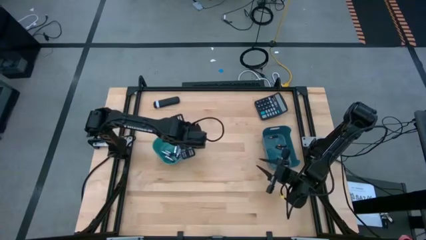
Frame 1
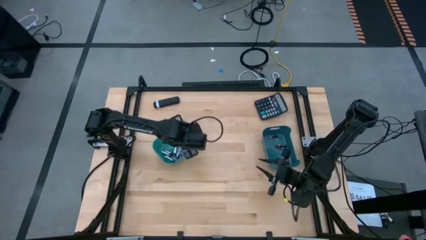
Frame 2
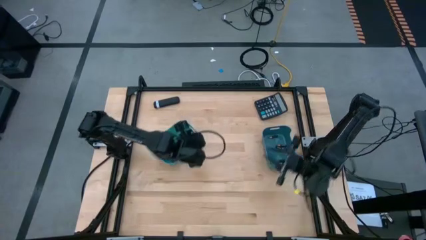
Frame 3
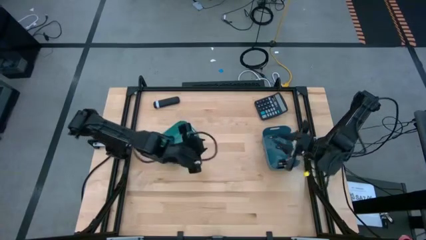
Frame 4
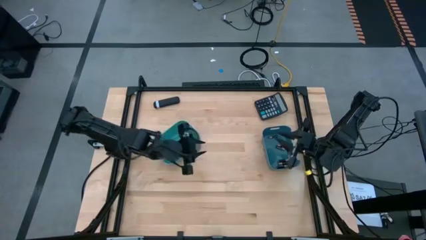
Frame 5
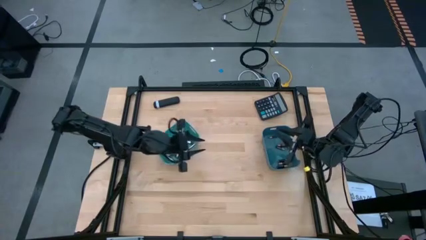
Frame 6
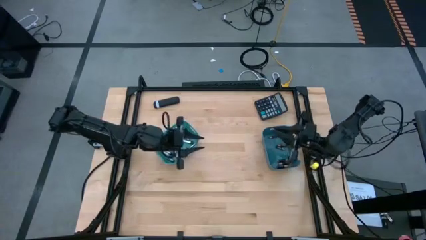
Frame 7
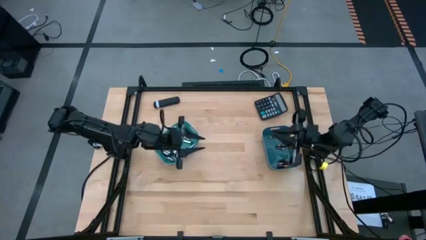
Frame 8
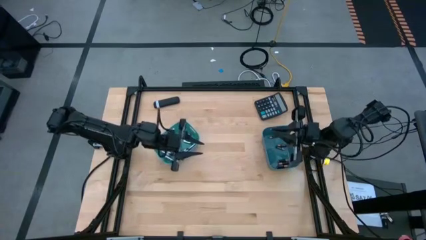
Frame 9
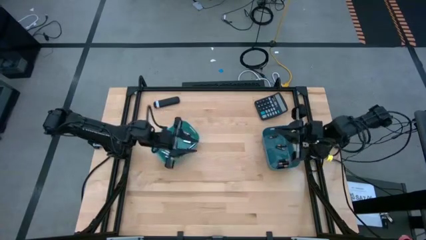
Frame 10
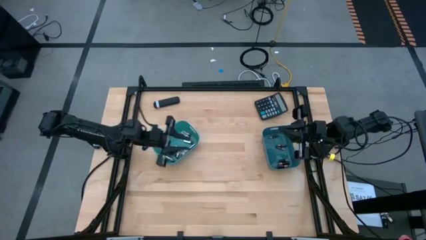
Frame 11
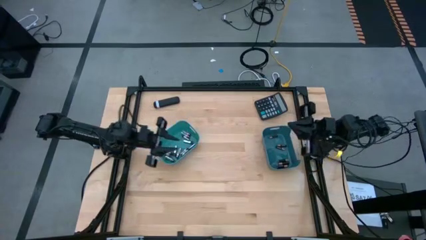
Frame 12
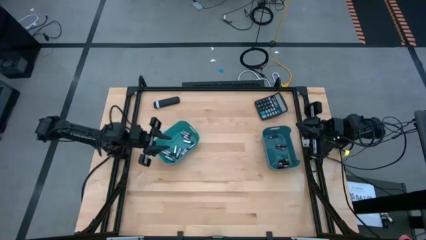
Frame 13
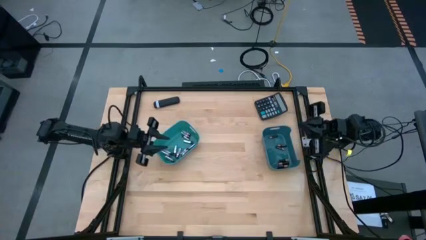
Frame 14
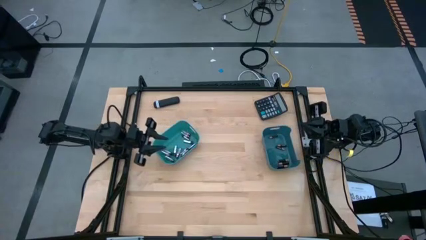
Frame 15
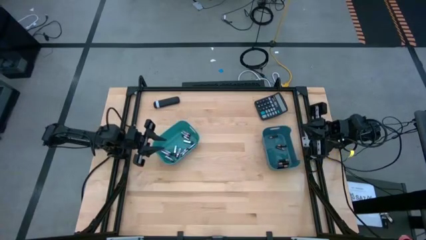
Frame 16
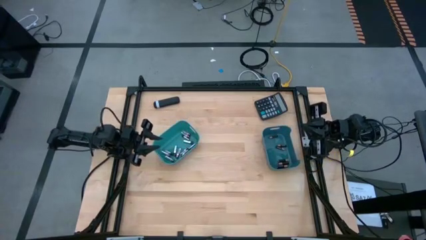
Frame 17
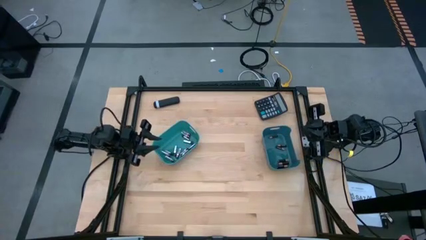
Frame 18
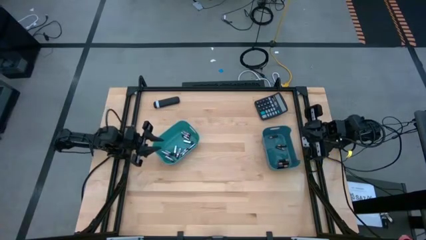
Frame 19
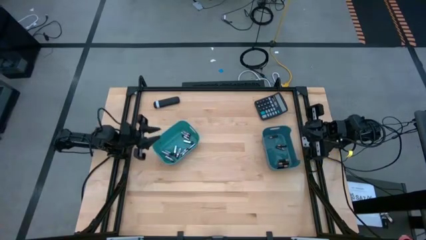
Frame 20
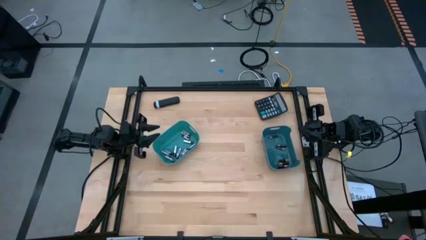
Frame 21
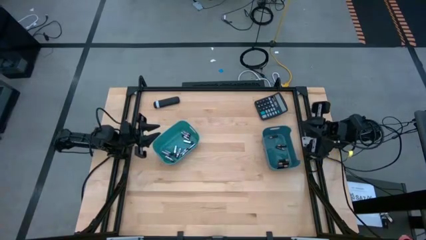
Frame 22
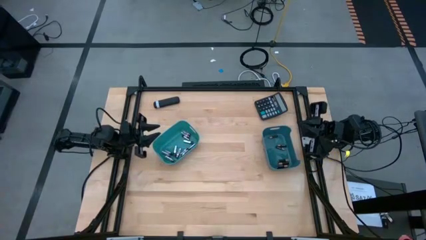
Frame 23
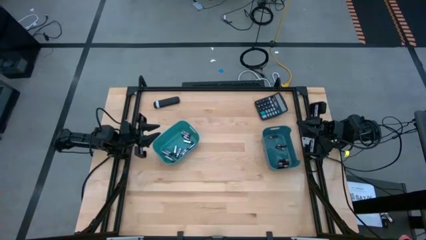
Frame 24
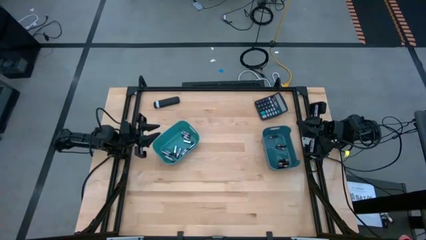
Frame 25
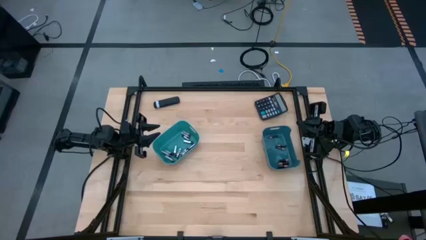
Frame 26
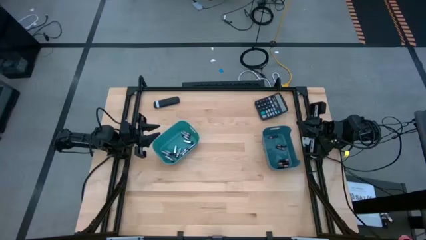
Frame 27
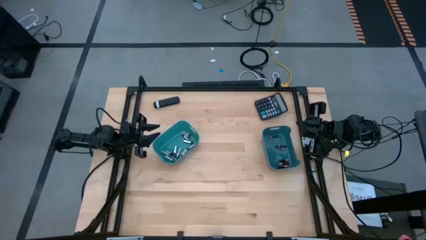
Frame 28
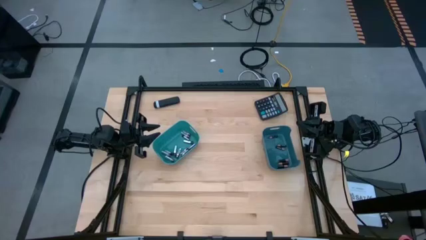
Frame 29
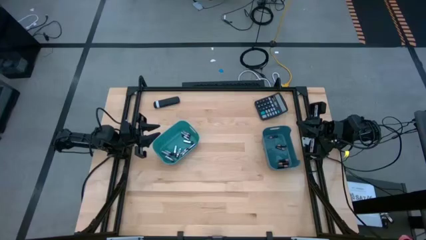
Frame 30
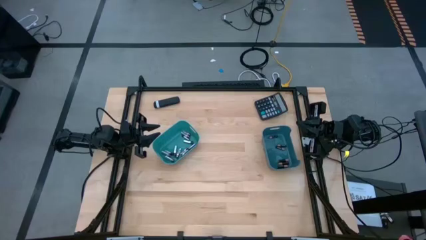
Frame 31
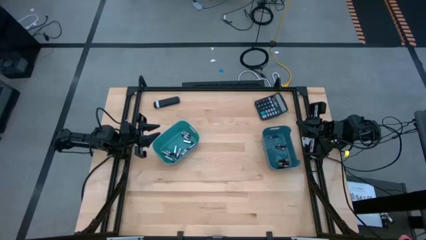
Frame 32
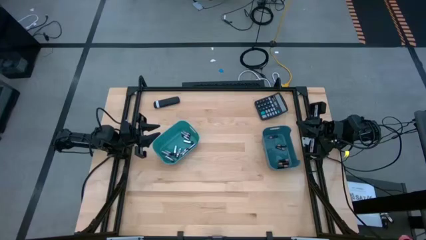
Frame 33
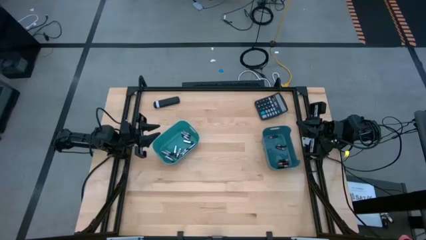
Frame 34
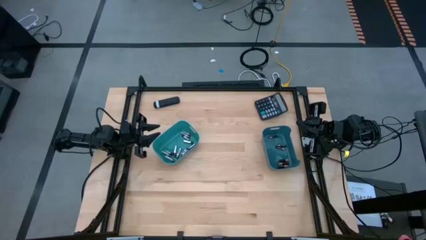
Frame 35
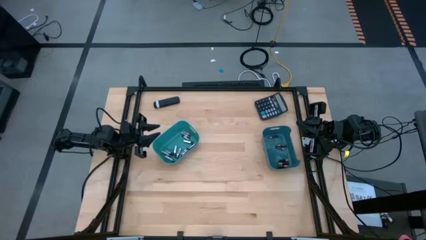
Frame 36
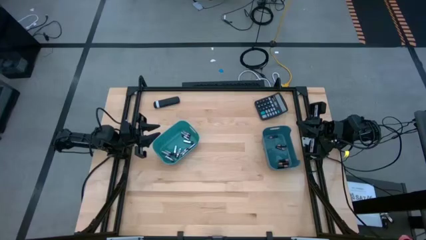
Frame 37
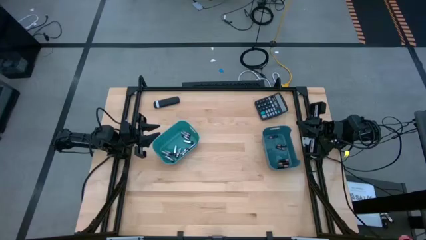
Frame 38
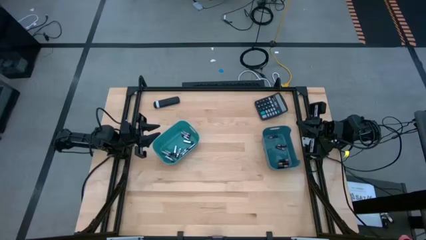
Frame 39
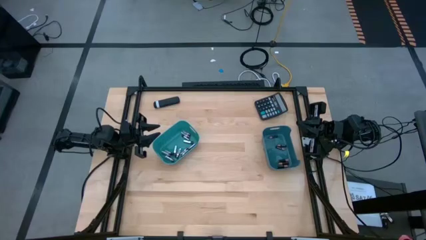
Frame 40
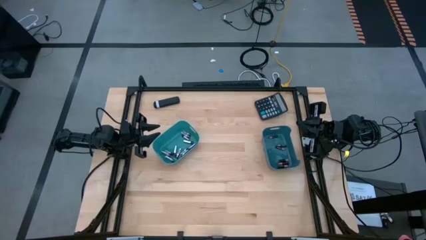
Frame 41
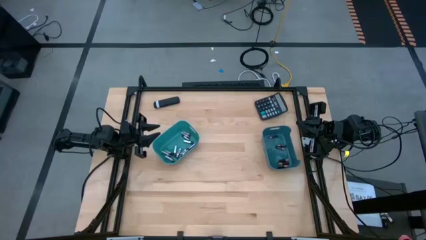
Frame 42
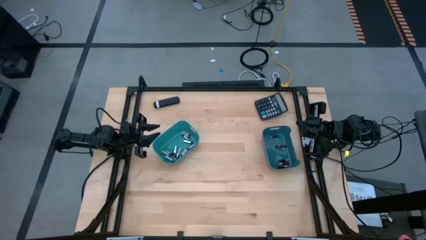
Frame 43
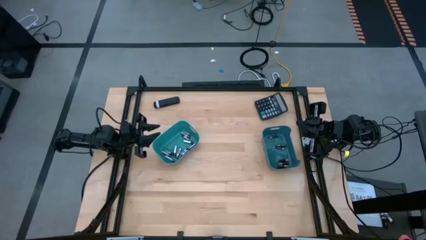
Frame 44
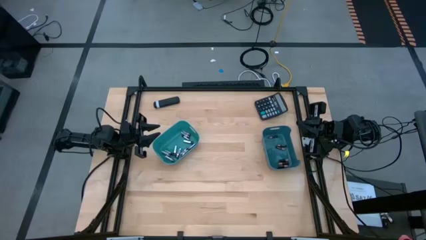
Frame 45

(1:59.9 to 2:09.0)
Task: Sort batteries
Return to Home Position

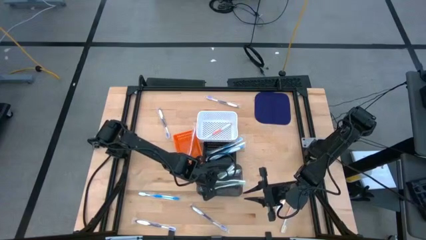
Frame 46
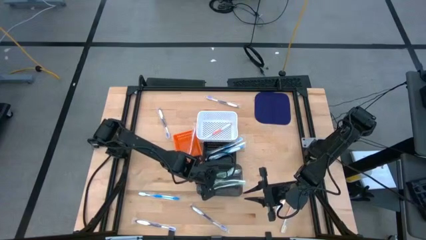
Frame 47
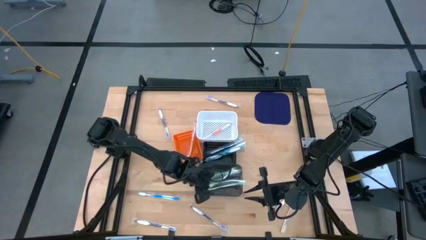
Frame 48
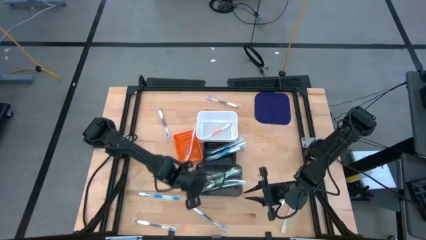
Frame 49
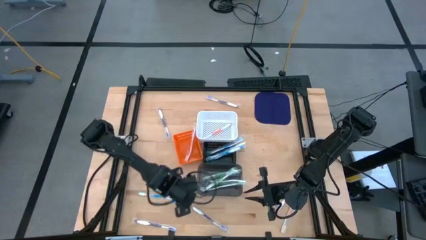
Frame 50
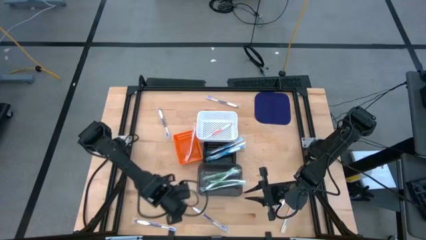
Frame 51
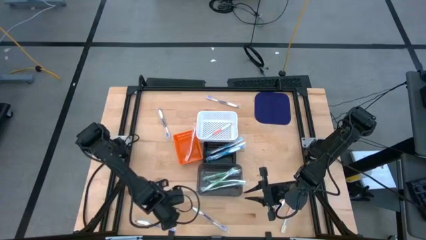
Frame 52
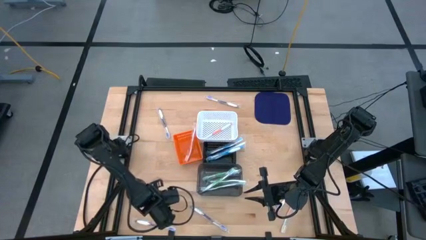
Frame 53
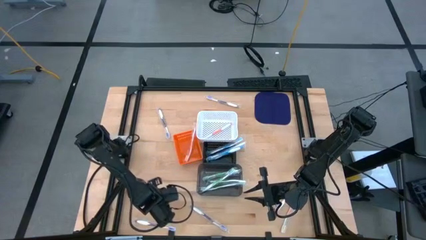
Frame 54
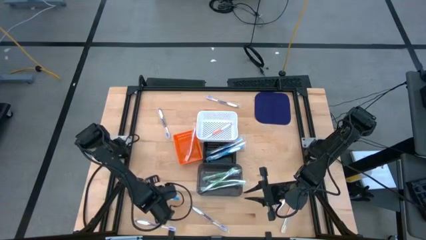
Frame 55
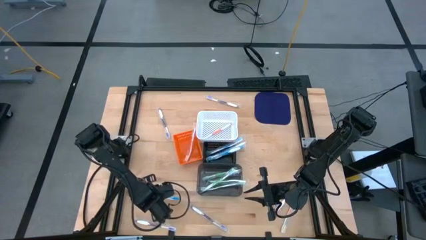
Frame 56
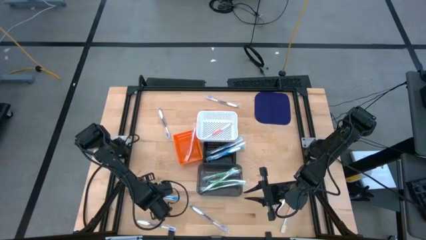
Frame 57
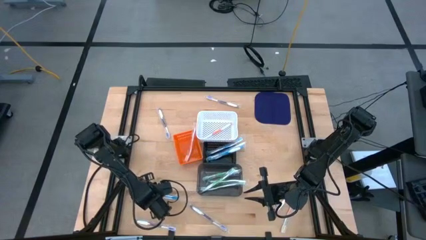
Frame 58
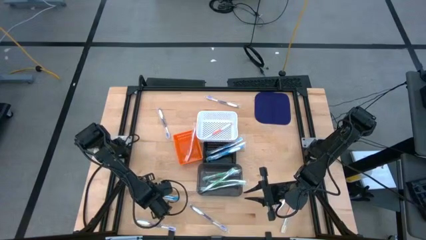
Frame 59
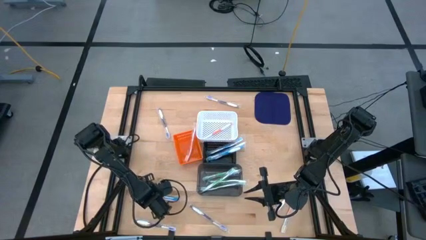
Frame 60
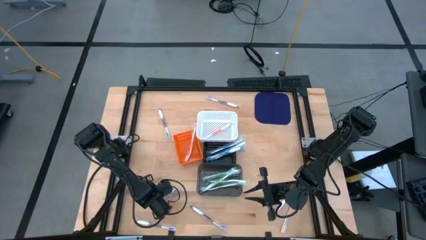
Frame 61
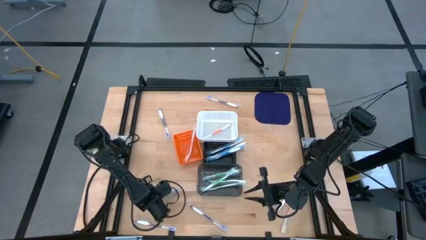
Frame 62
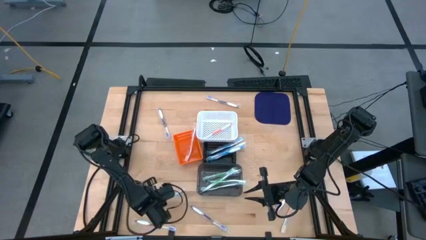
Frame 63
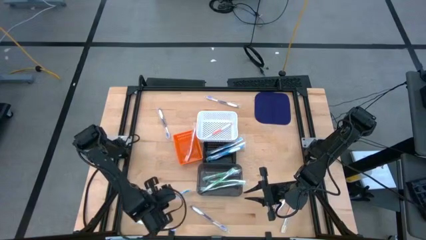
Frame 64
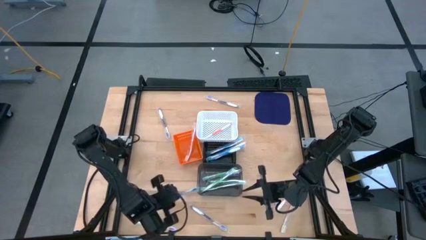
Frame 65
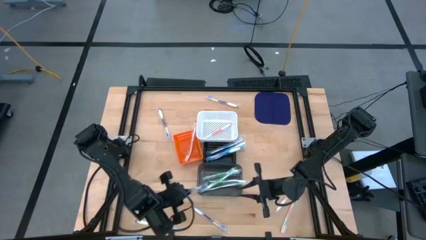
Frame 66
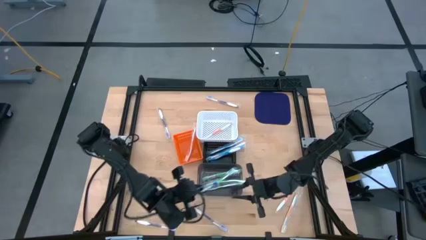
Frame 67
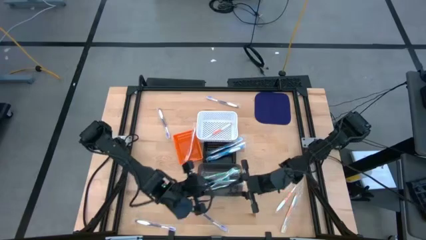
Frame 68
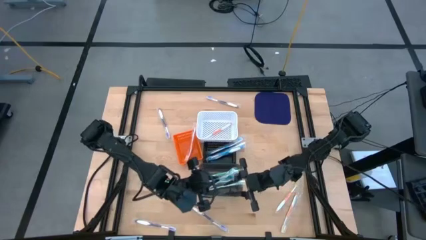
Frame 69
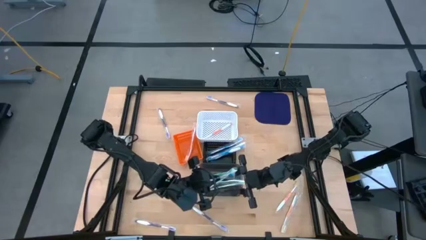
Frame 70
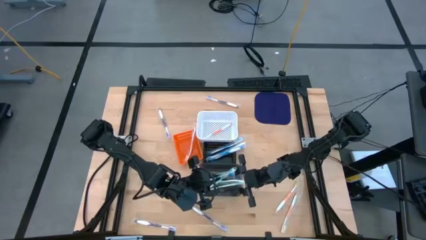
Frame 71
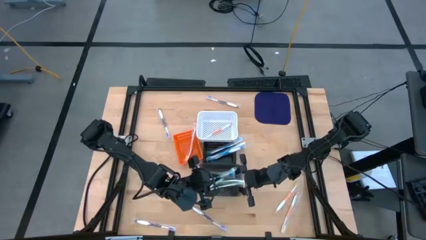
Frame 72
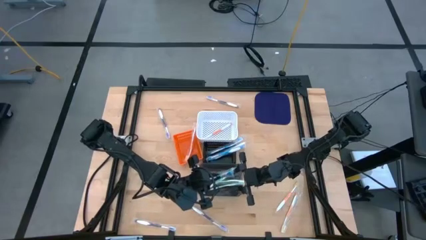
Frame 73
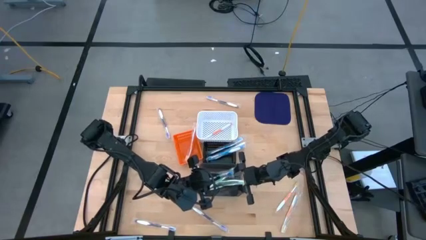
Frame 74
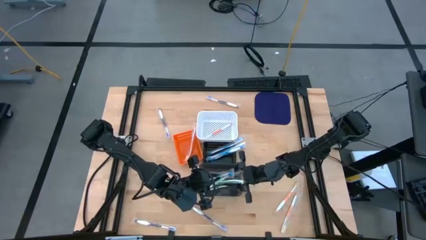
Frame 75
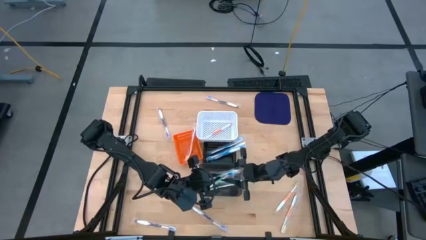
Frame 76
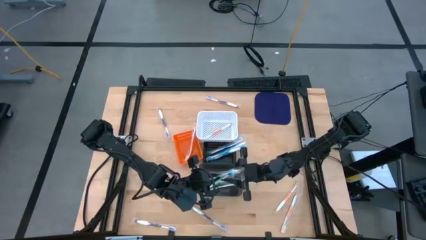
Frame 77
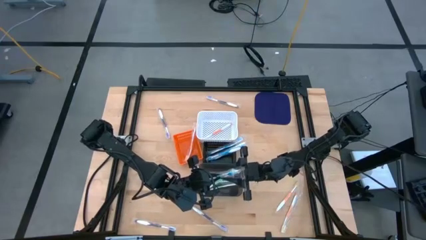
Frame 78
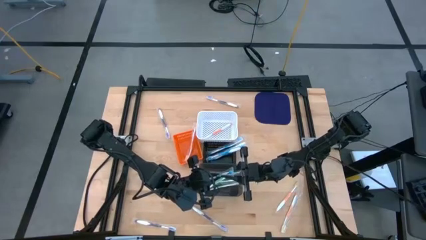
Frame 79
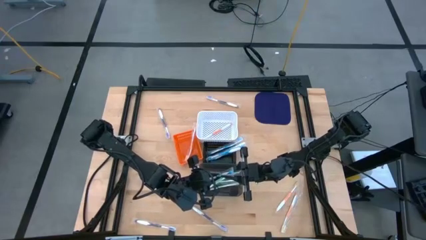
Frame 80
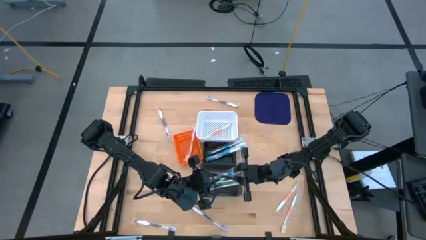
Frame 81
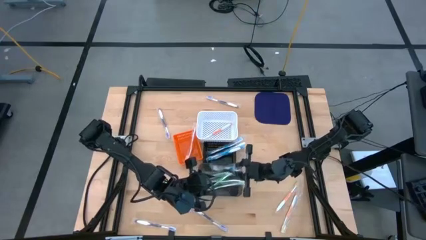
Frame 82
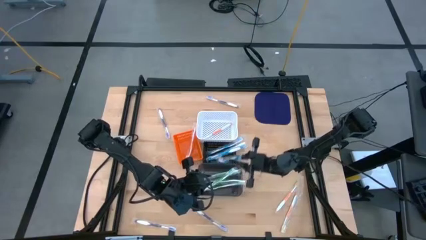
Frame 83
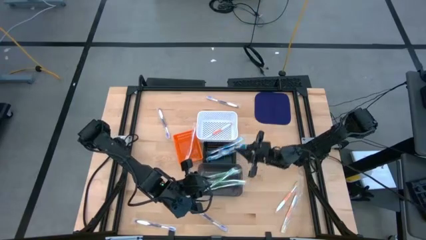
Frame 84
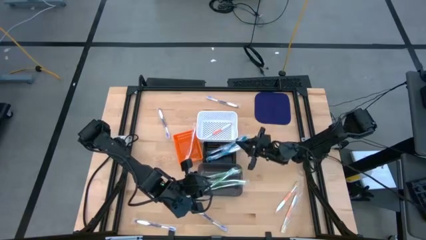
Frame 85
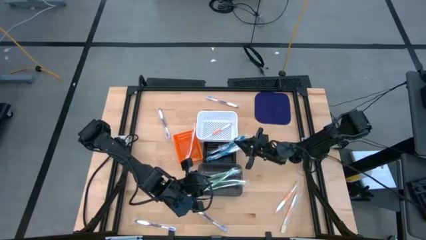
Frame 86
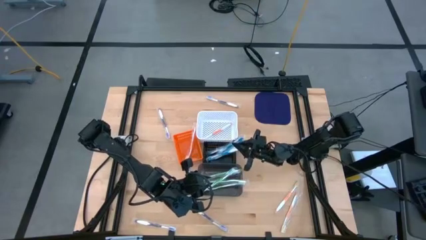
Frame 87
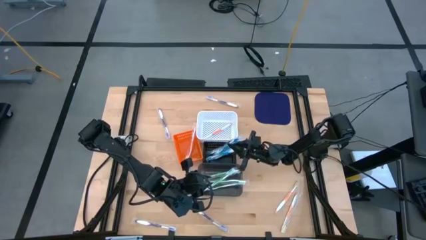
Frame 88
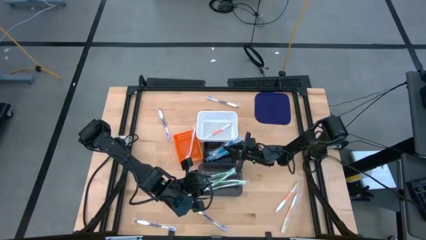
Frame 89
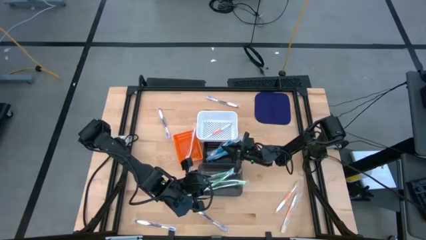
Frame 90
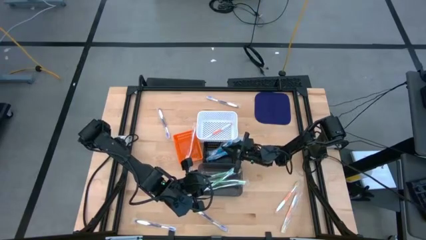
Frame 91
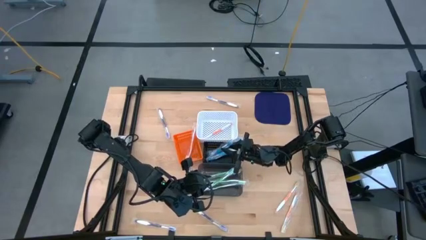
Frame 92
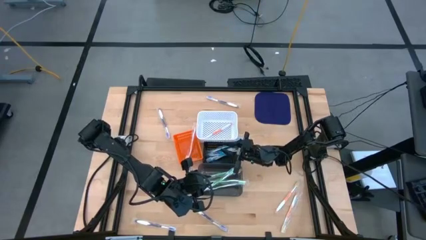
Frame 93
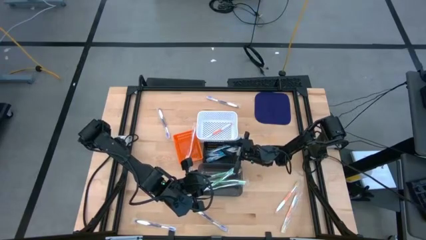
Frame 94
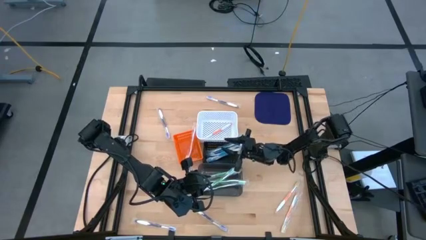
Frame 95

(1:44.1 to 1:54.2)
Task: Pick & Place Toothbrushes
Put the blue toothbrush into the top black basket
